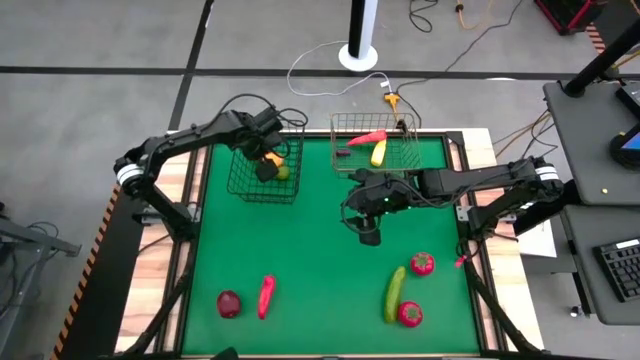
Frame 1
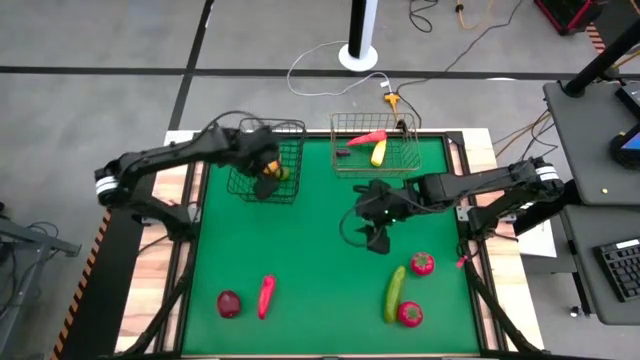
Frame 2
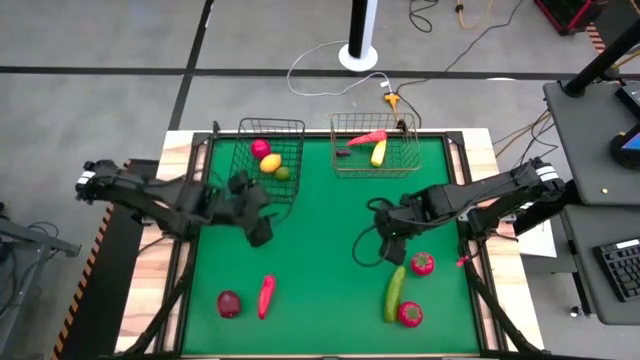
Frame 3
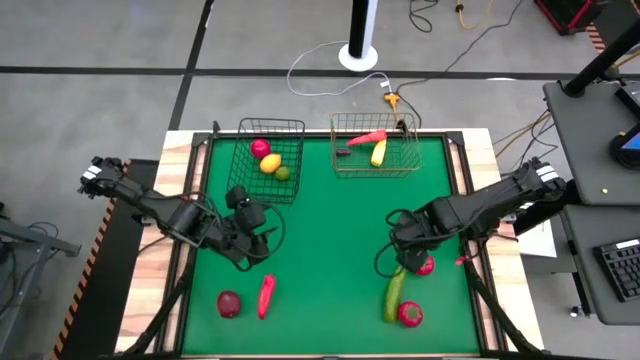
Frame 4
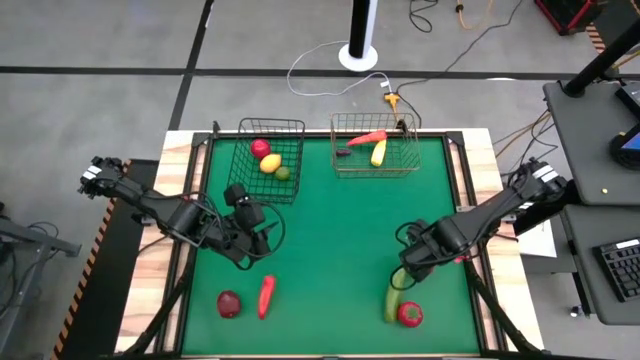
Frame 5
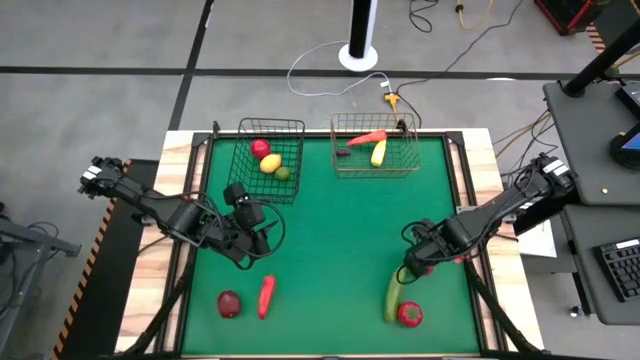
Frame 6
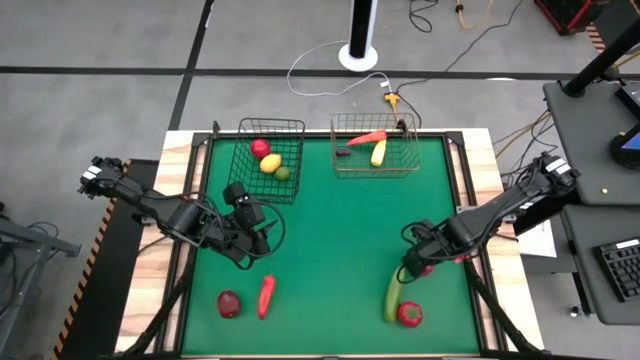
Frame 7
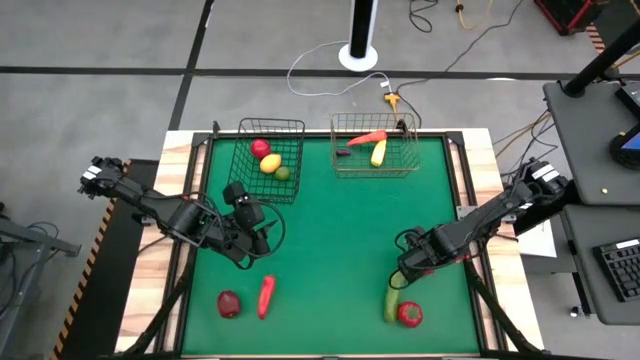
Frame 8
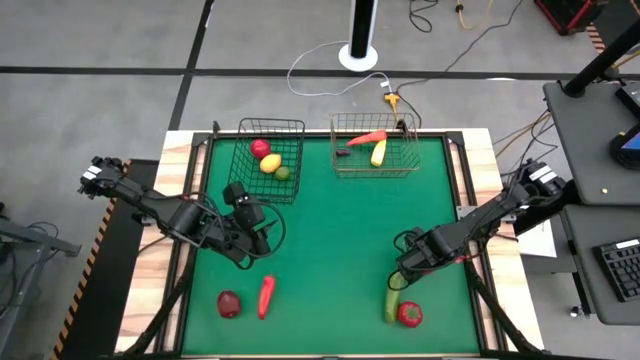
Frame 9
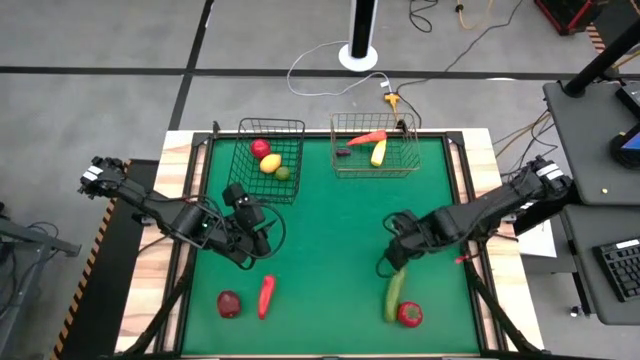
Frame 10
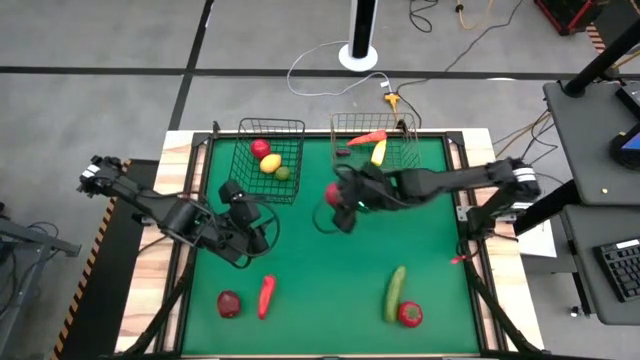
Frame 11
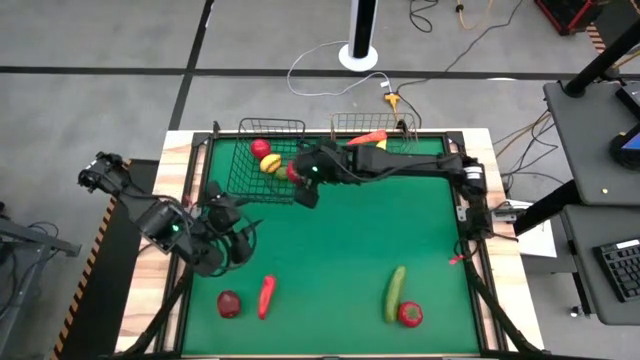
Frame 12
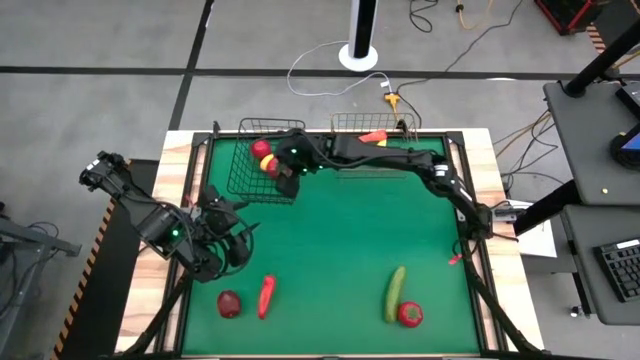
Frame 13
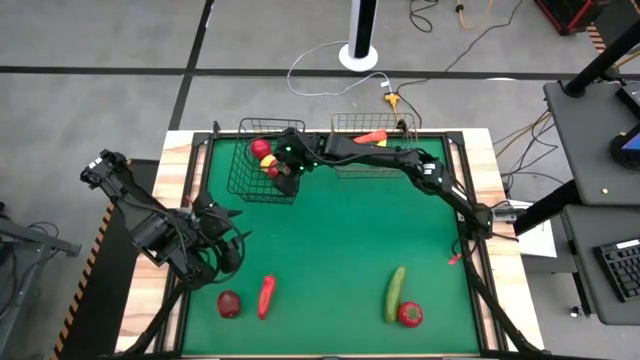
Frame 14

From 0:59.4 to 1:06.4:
Task: Sort produce into baskets
Put the top tomato into the black wire basket

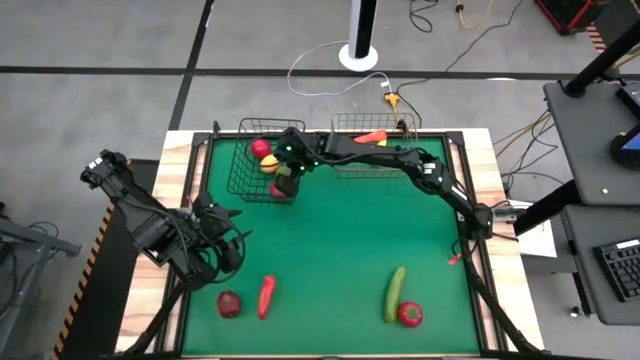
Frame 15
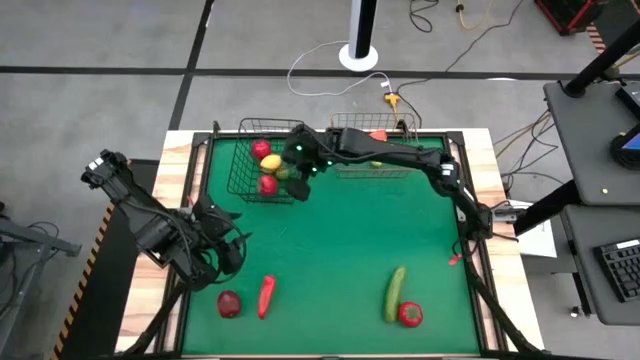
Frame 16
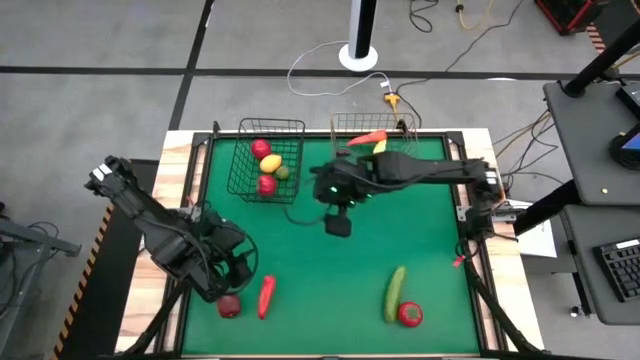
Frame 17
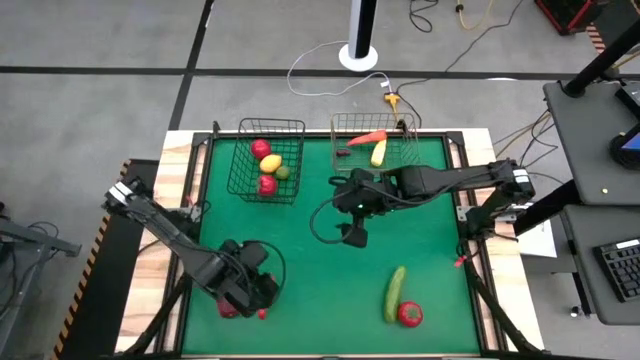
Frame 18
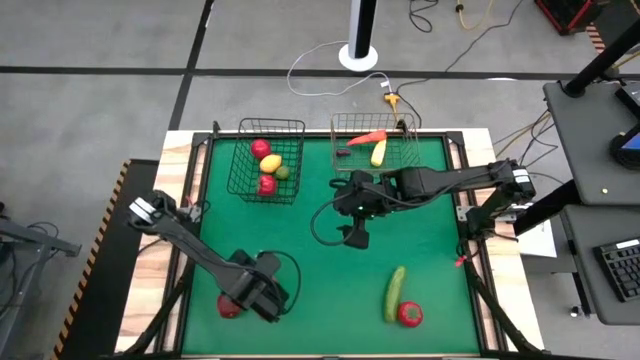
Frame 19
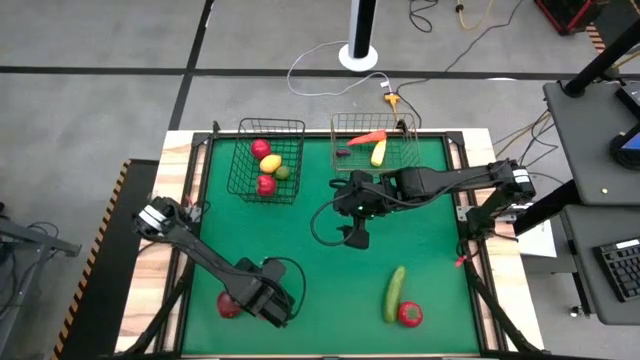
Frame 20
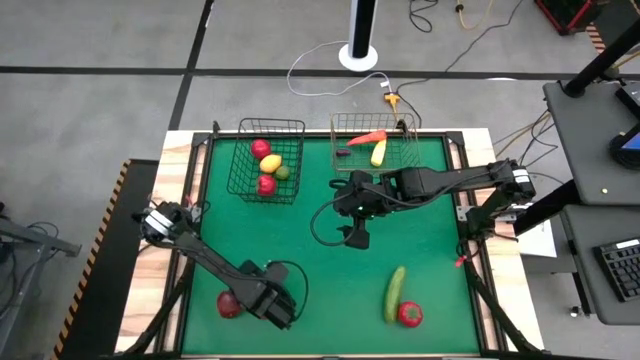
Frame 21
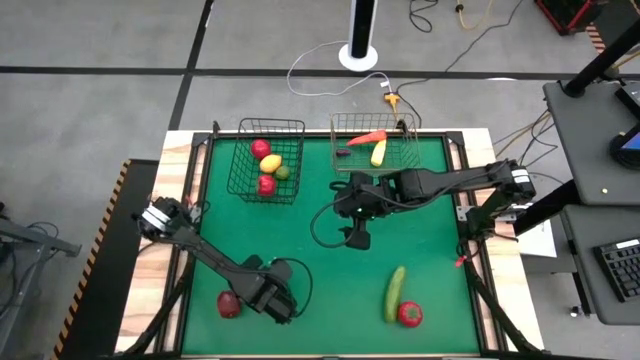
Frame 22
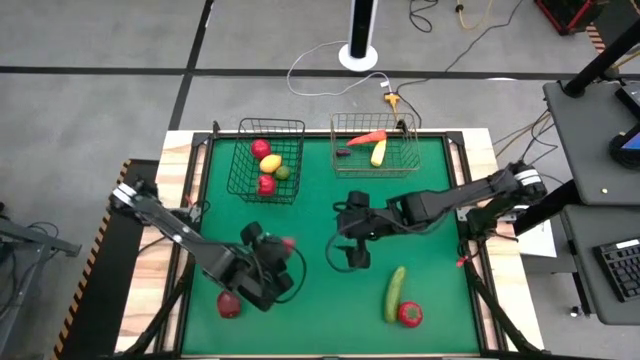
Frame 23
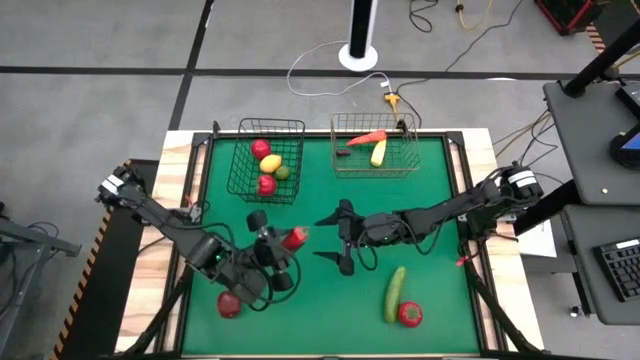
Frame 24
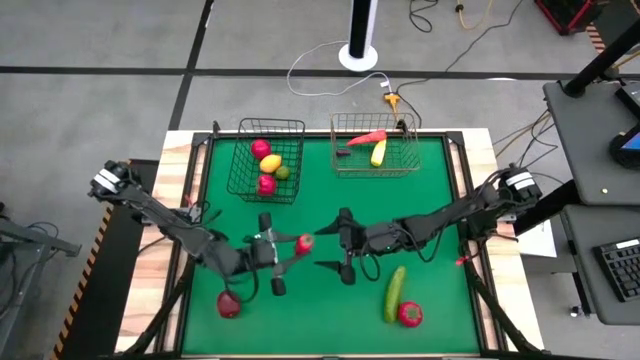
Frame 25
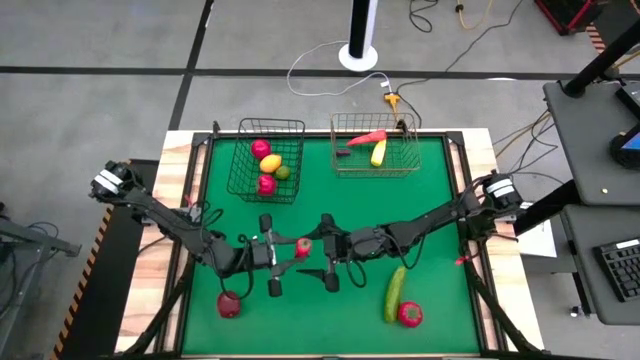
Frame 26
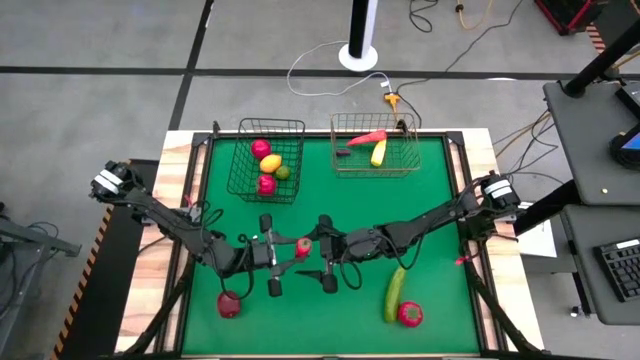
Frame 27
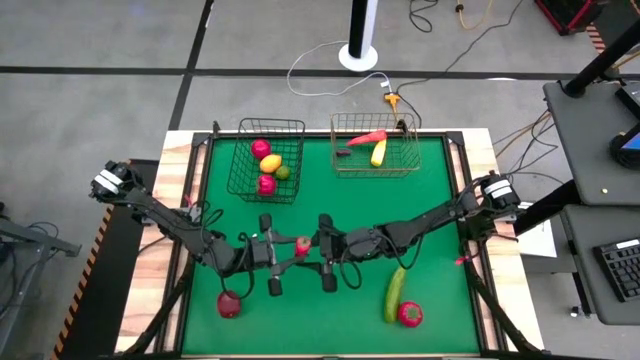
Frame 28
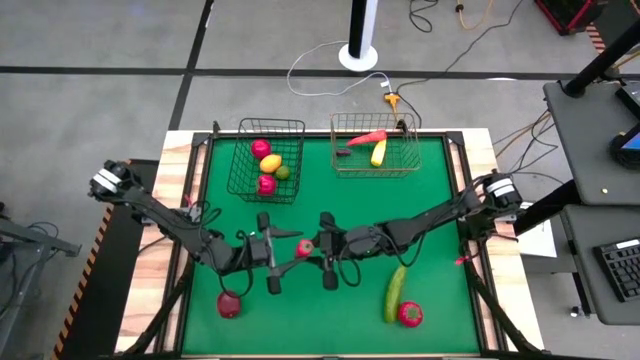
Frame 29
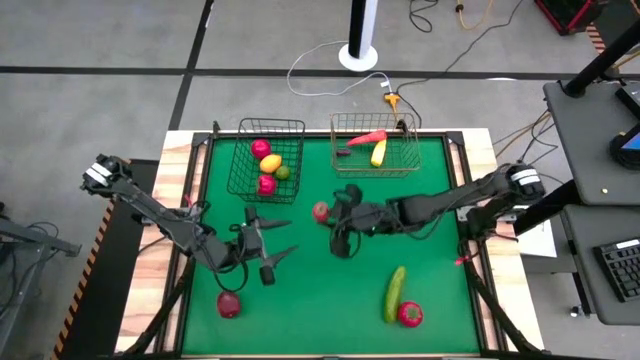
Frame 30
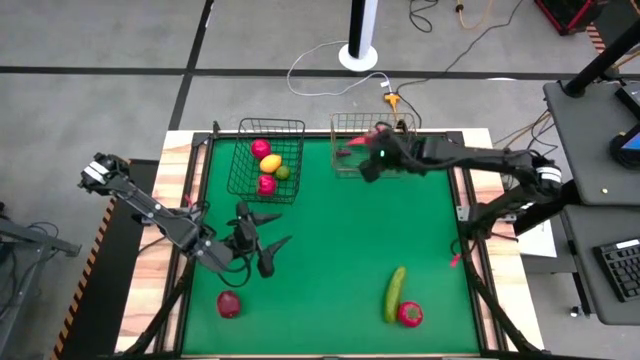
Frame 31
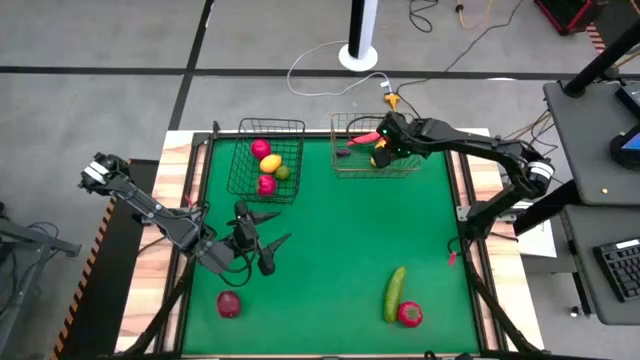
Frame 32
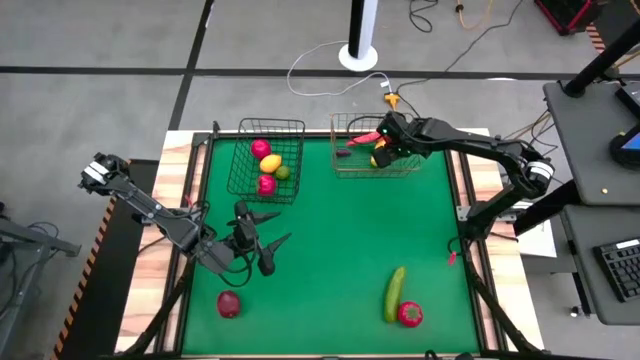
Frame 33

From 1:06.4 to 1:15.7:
Put the chilli pepper into the gold wire basket
